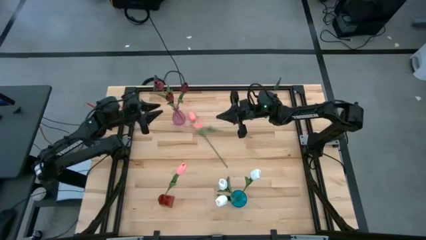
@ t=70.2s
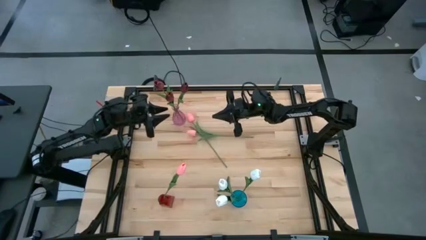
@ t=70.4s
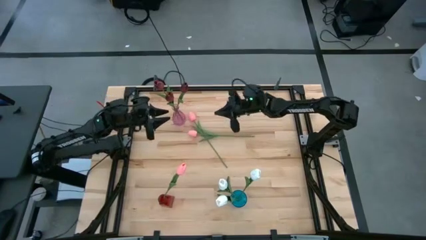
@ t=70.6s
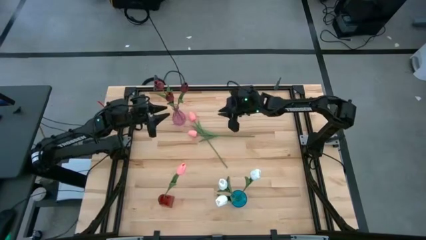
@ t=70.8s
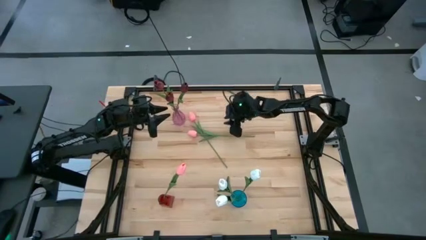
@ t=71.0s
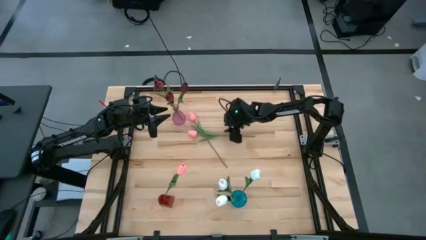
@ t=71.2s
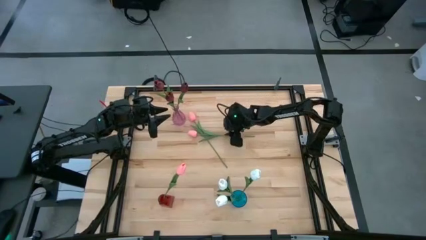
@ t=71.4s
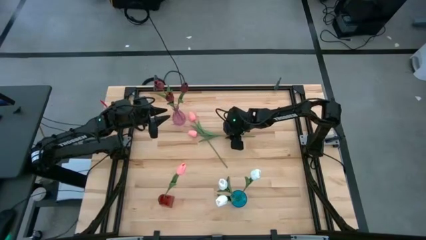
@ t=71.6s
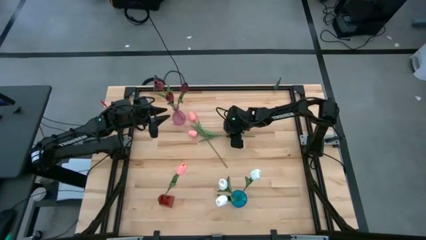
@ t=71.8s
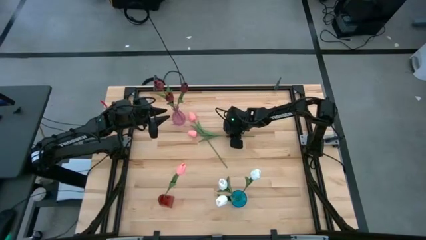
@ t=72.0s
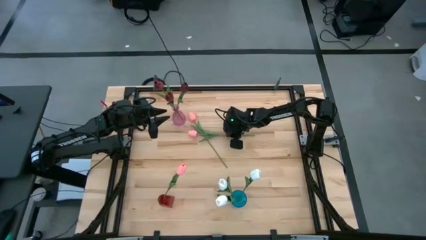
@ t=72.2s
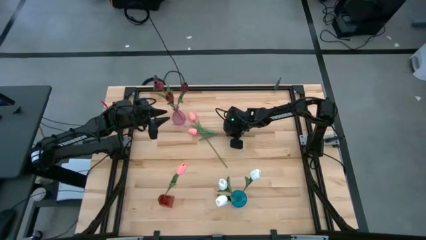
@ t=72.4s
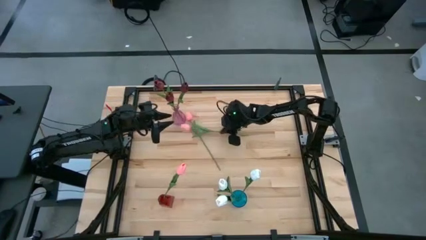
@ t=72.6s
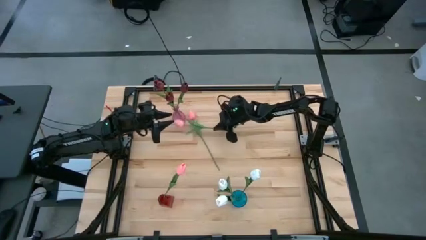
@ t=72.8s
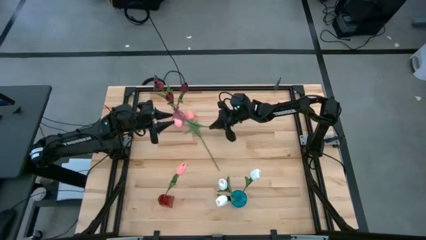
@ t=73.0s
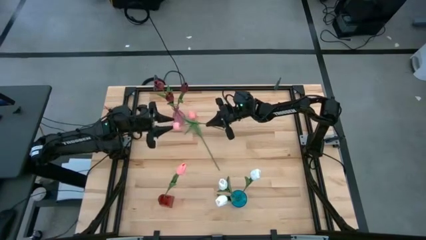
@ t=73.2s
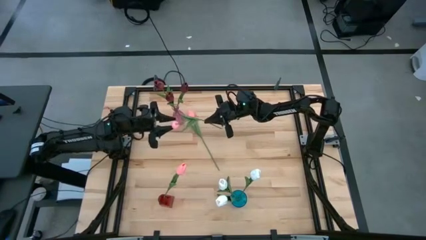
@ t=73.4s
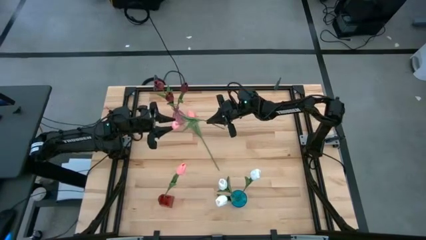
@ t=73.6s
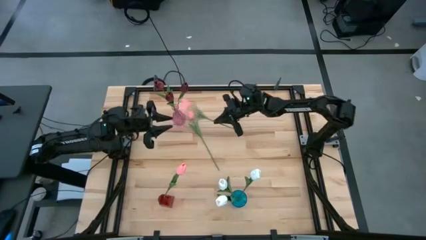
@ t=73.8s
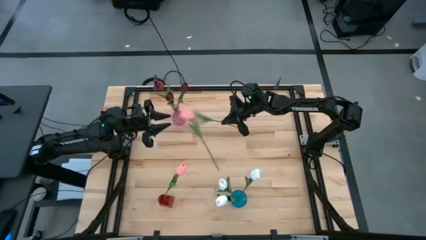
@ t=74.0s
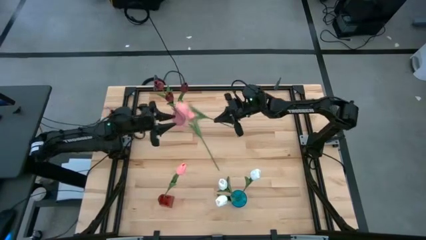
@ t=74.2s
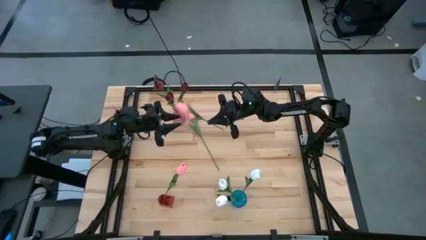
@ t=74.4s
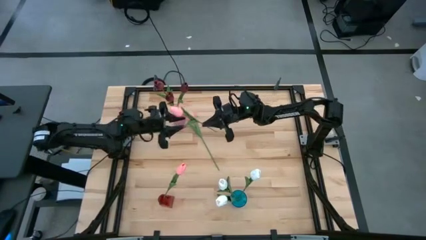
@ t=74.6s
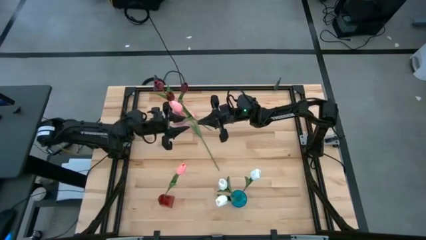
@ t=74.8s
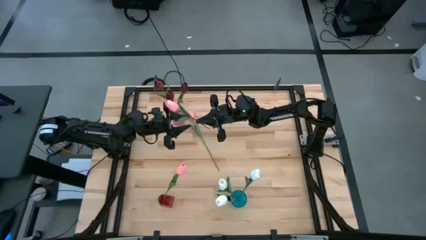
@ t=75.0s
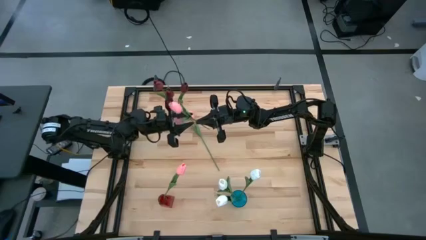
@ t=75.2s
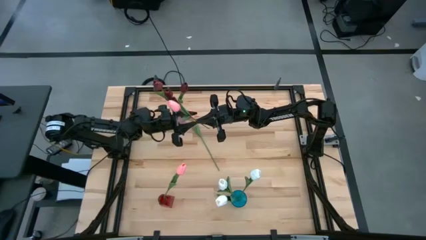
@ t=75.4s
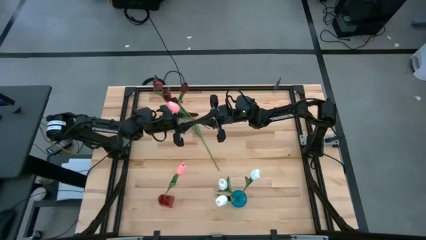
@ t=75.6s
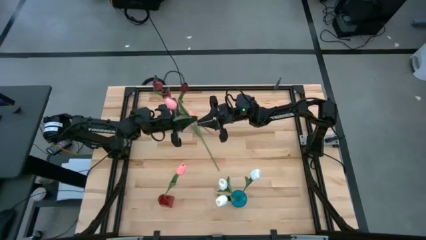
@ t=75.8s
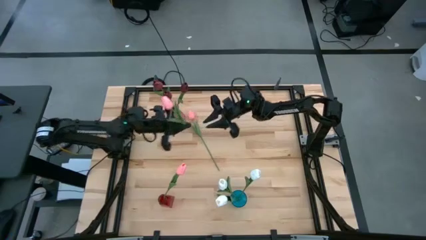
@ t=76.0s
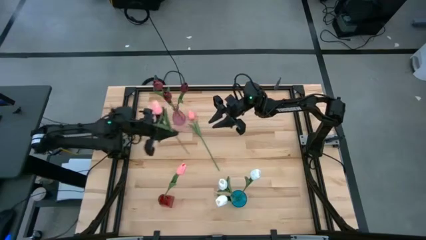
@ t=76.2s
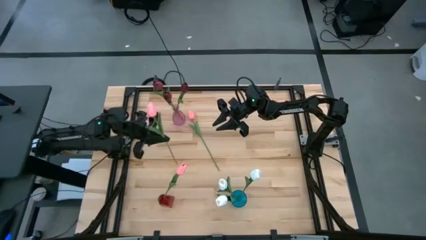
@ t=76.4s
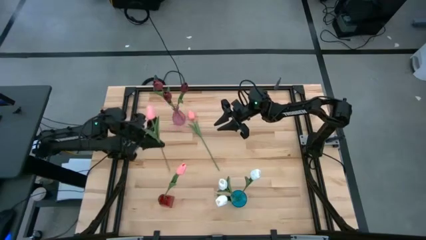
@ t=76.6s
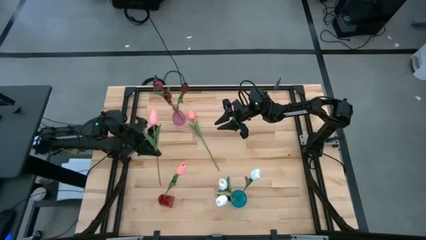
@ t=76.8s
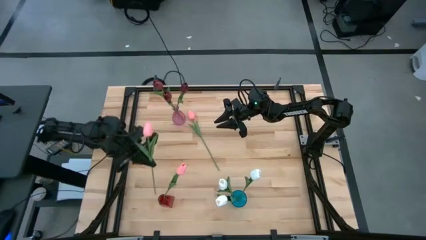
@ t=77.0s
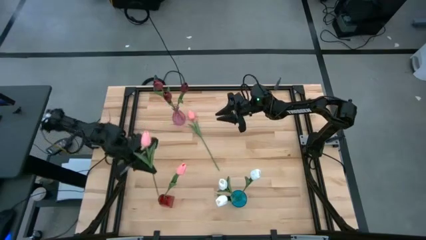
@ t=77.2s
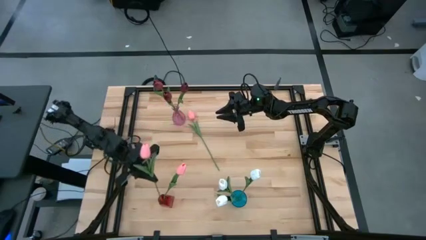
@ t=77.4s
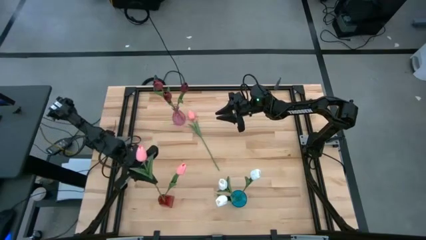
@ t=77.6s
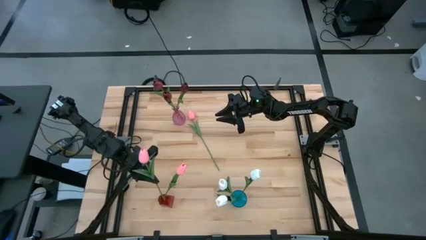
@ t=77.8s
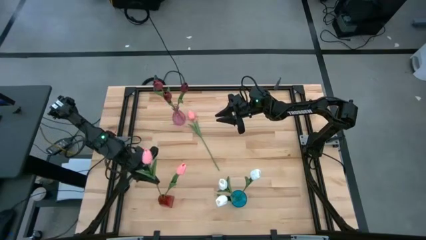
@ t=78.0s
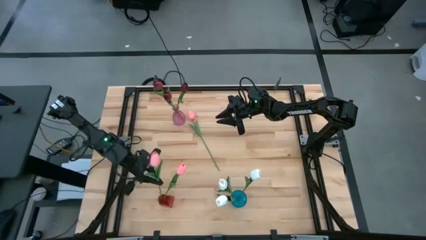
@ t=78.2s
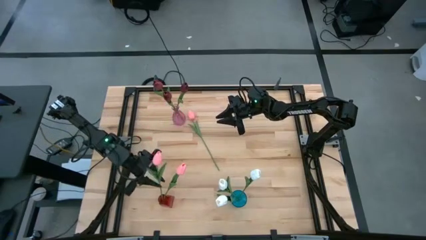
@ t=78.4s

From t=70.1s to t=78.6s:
Task: Sort flowers into vase by color
Put the bottom pink flower into the red vase

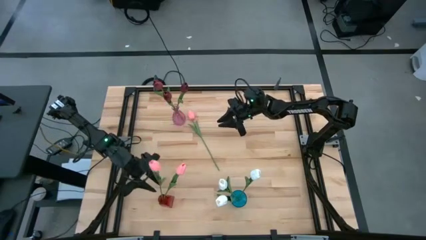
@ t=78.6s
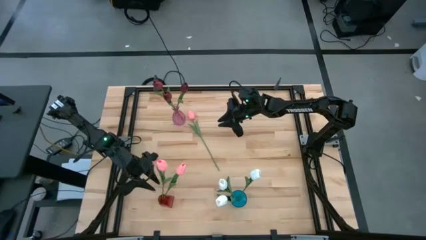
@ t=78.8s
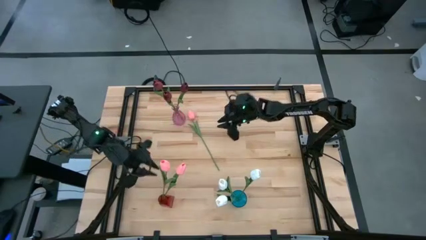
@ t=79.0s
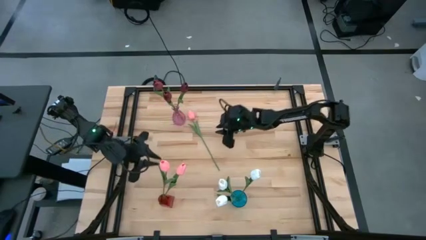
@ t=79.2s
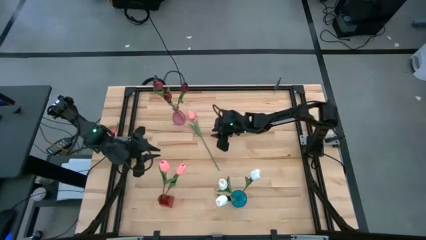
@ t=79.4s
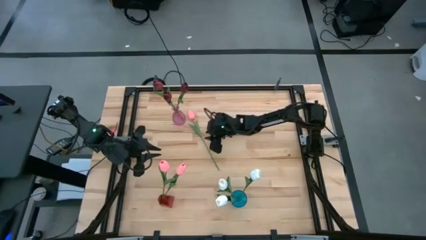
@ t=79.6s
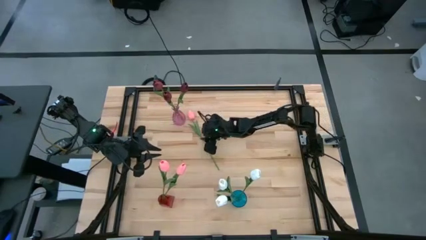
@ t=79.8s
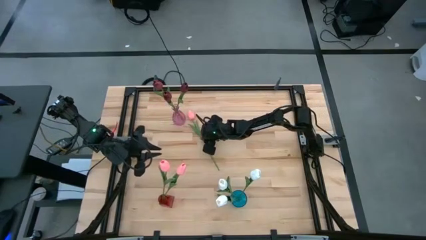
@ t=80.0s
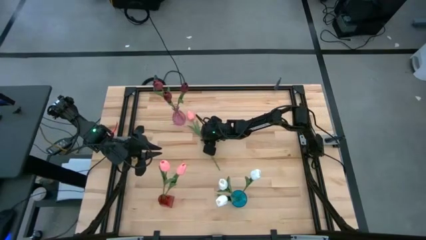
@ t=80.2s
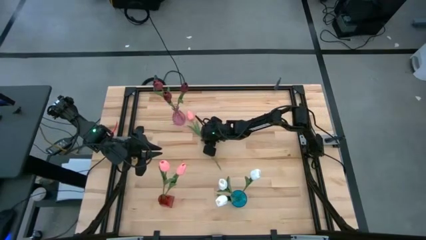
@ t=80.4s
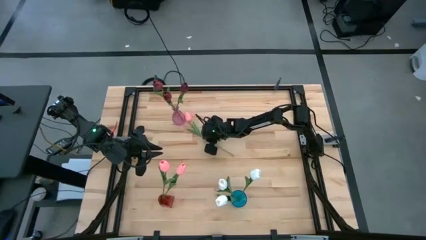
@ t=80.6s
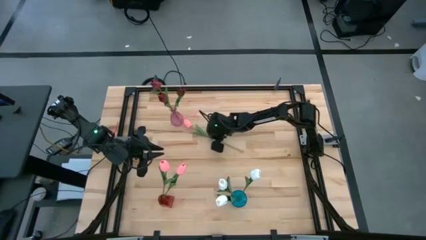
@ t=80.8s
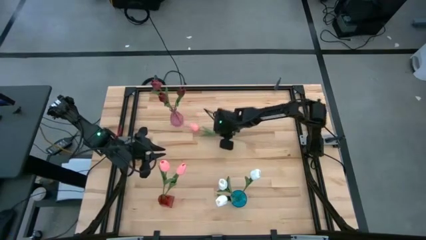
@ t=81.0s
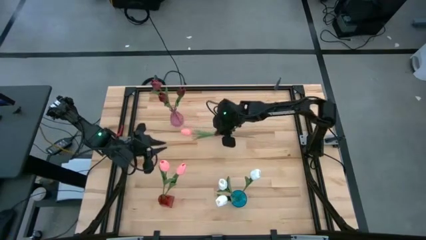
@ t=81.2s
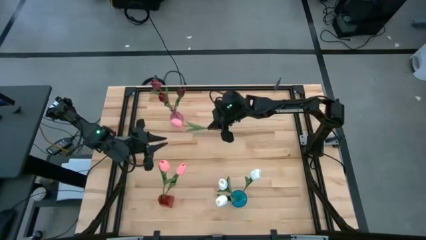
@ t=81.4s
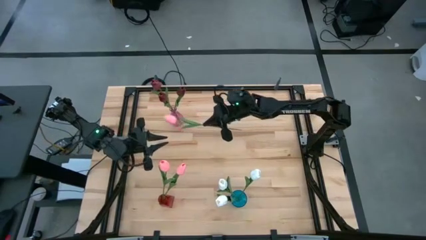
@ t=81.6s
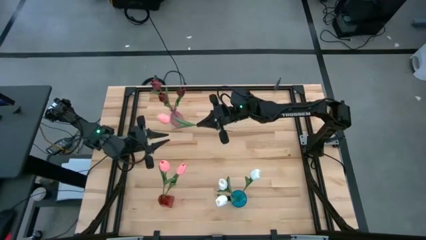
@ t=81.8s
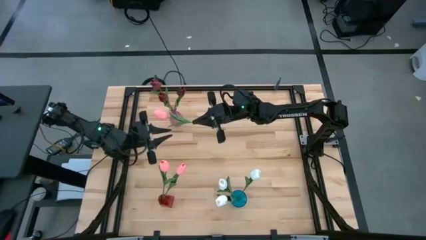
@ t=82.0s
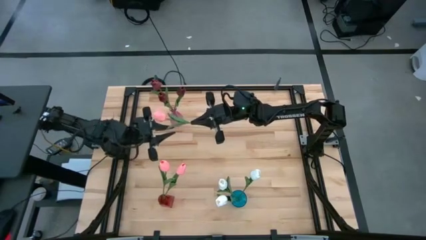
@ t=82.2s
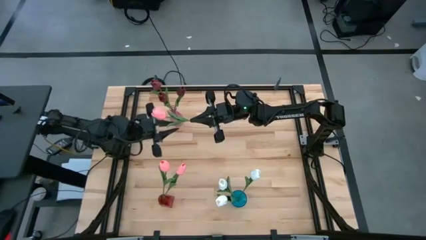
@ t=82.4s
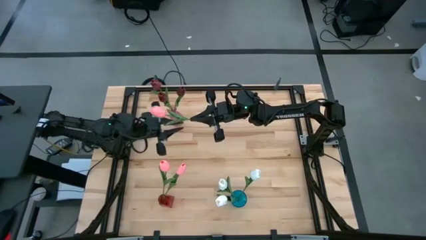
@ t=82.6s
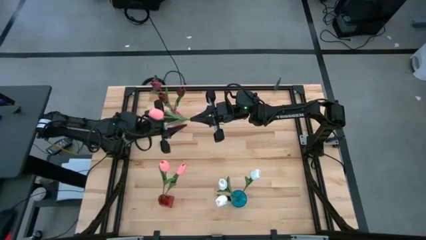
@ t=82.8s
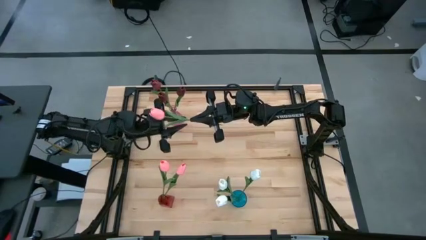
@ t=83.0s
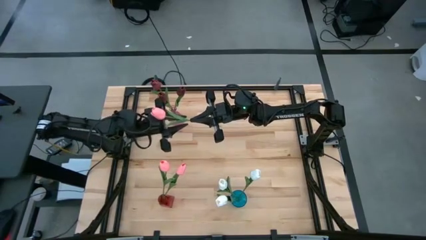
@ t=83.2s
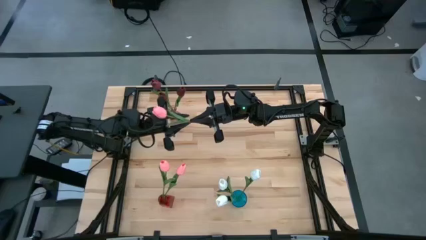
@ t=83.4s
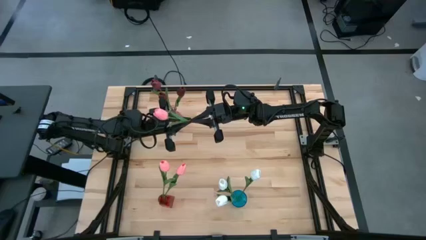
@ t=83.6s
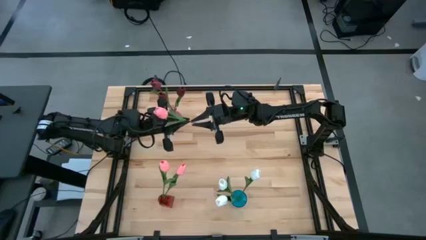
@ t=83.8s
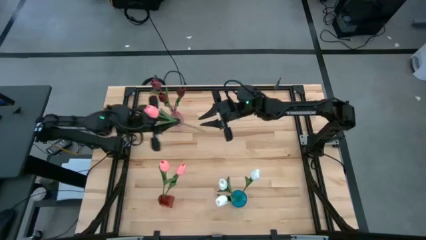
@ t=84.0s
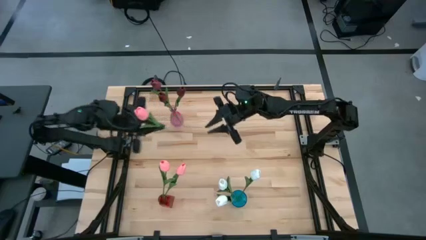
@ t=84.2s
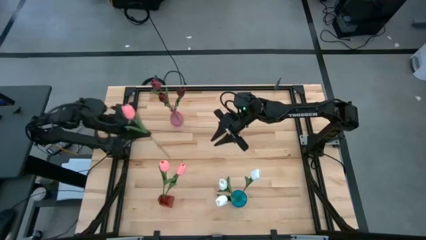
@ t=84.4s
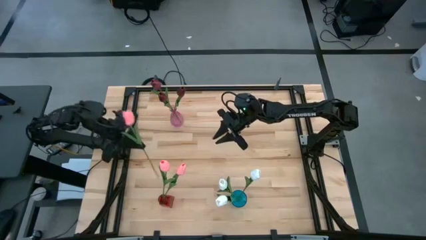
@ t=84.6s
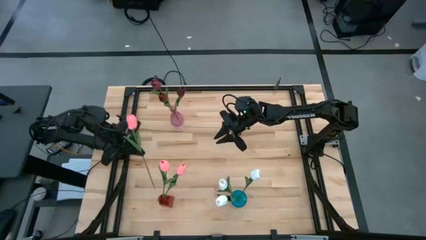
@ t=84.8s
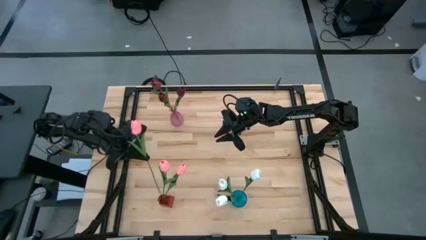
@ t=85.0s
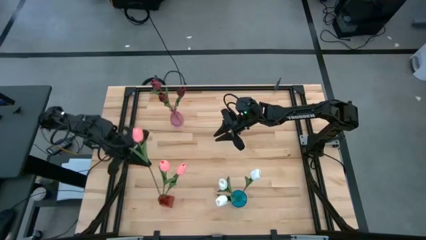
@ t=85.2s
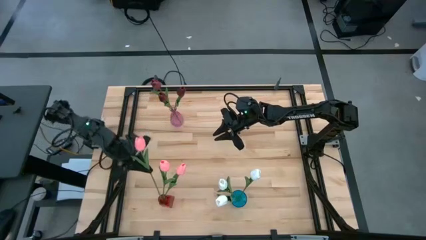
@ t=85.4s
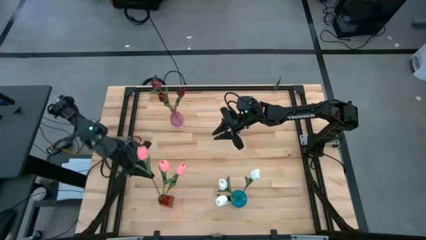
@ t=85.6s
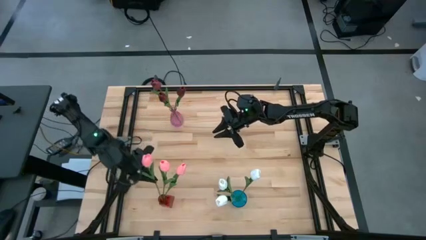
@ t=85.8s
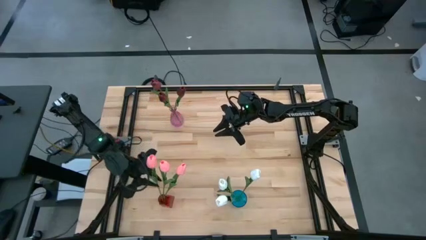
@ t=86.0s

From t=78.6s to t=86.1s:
Put the pink flower into the red vase
